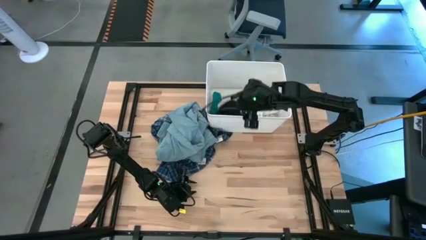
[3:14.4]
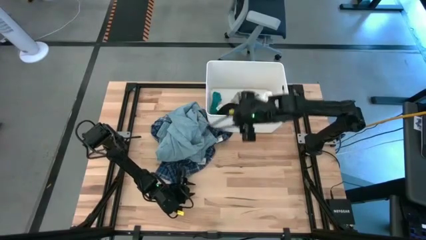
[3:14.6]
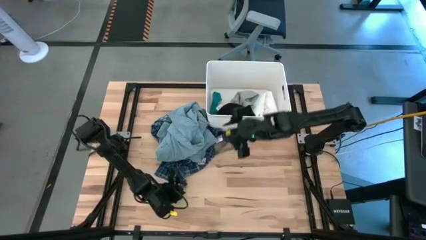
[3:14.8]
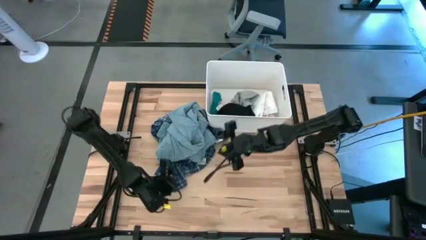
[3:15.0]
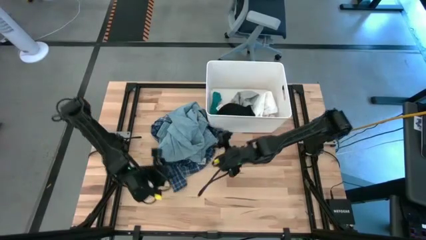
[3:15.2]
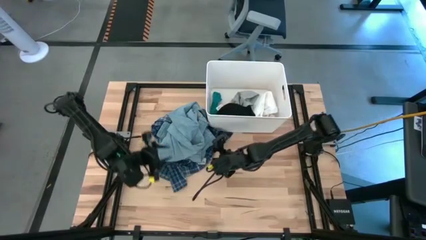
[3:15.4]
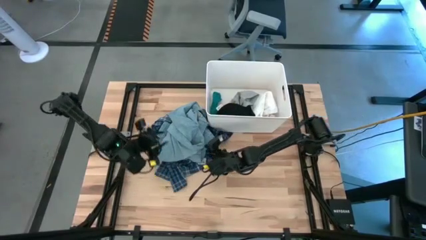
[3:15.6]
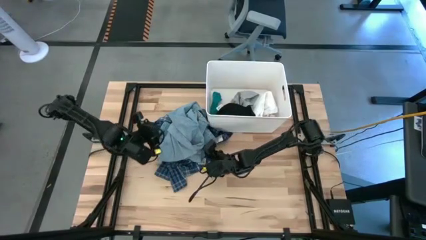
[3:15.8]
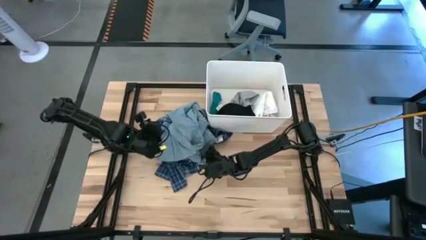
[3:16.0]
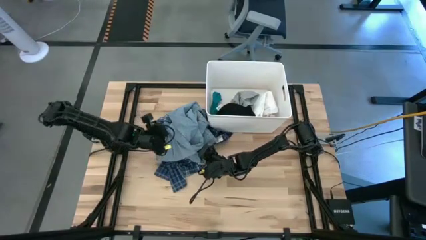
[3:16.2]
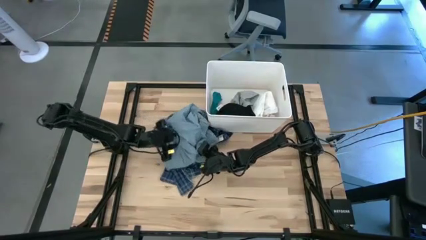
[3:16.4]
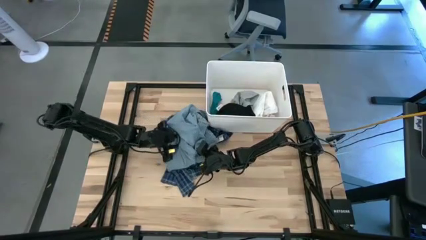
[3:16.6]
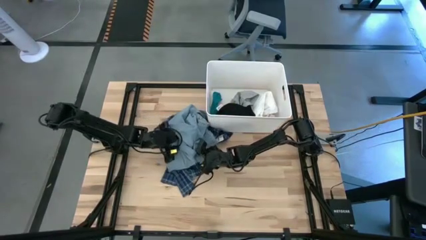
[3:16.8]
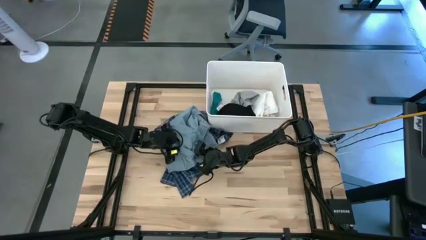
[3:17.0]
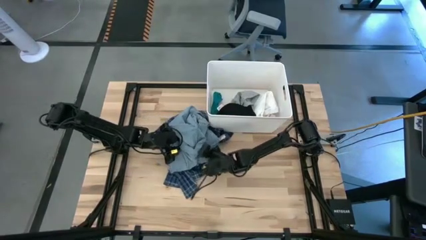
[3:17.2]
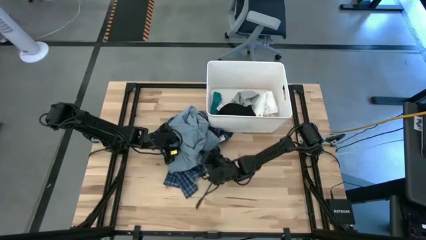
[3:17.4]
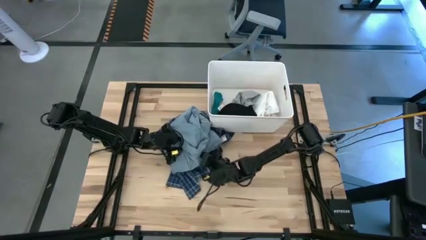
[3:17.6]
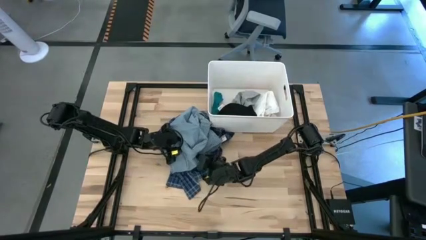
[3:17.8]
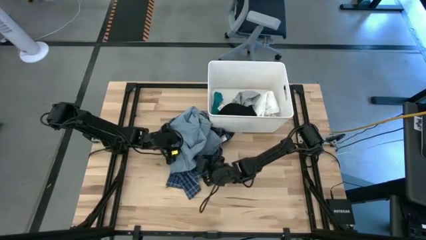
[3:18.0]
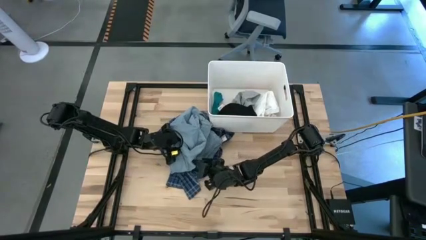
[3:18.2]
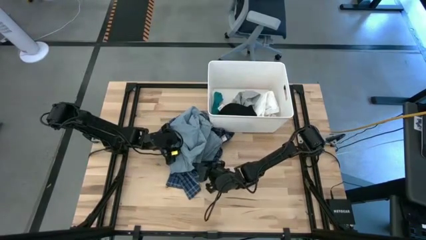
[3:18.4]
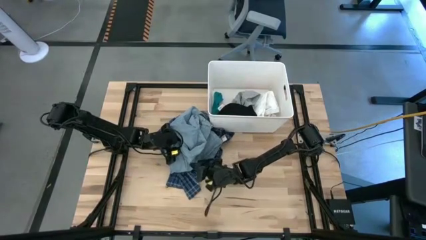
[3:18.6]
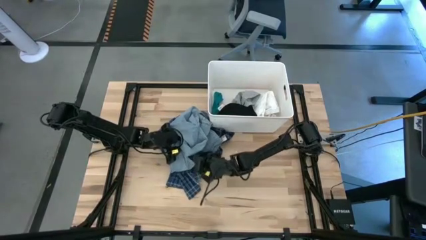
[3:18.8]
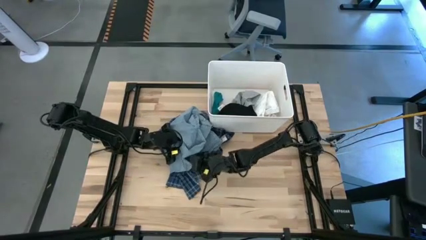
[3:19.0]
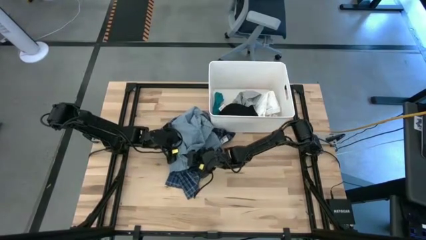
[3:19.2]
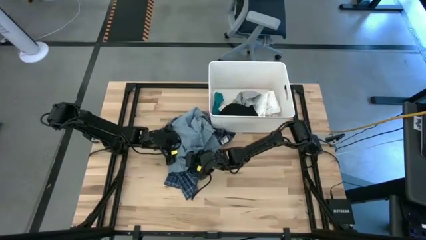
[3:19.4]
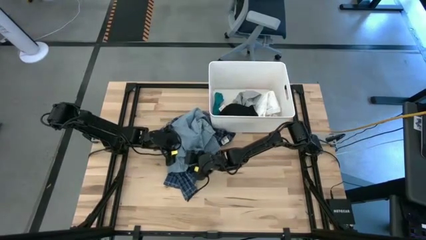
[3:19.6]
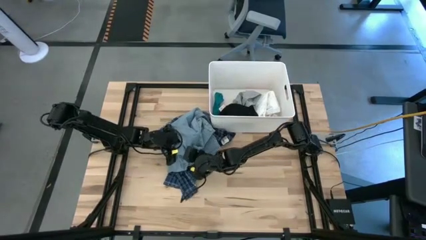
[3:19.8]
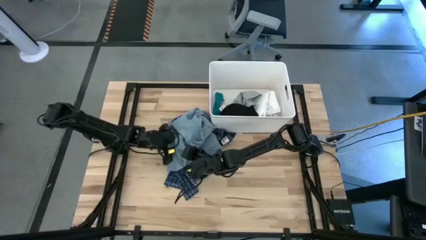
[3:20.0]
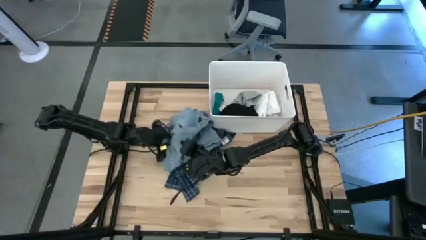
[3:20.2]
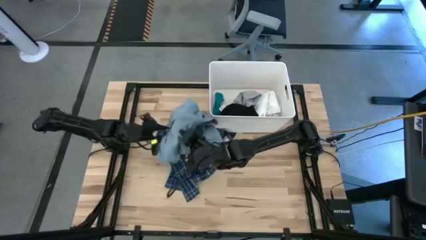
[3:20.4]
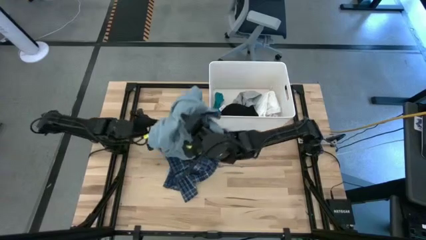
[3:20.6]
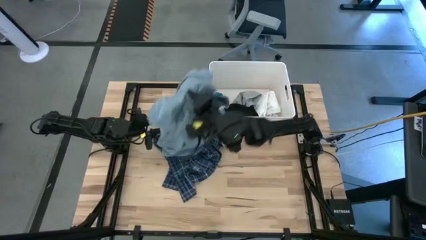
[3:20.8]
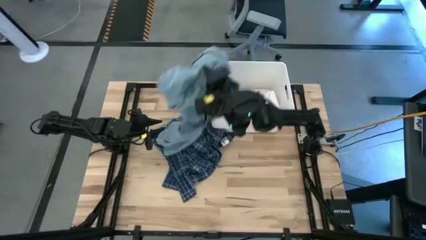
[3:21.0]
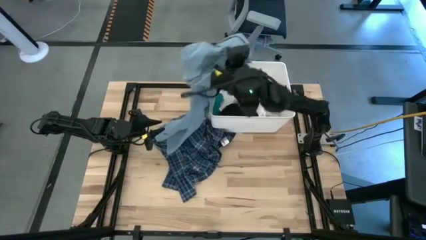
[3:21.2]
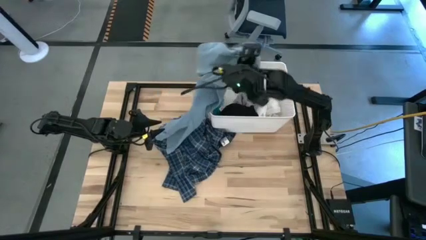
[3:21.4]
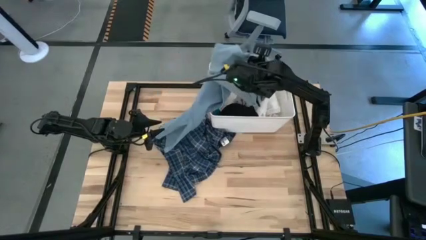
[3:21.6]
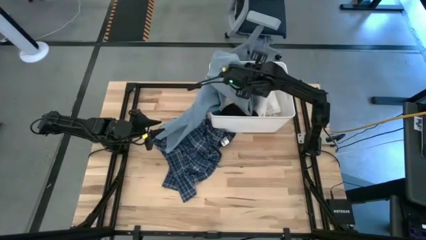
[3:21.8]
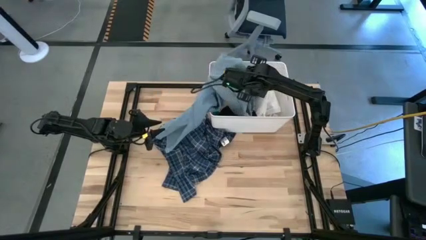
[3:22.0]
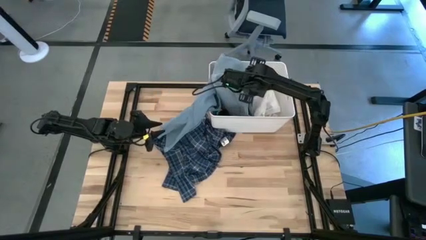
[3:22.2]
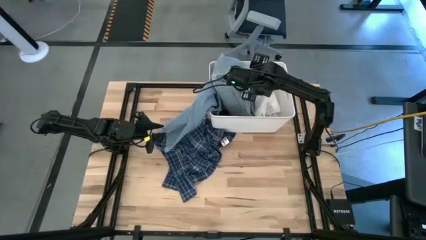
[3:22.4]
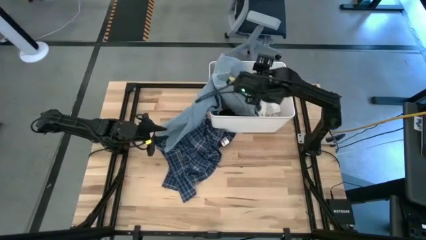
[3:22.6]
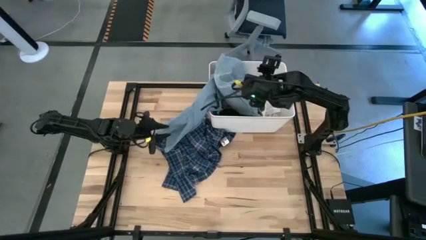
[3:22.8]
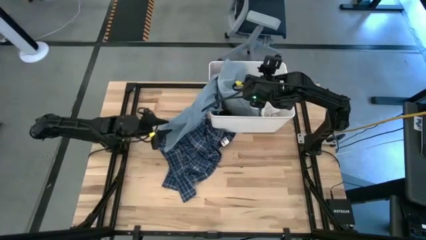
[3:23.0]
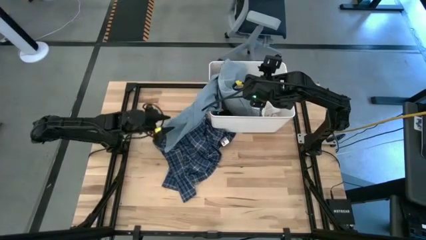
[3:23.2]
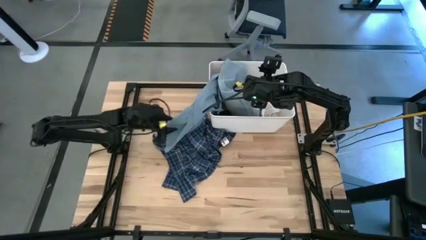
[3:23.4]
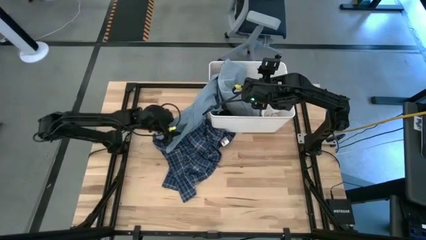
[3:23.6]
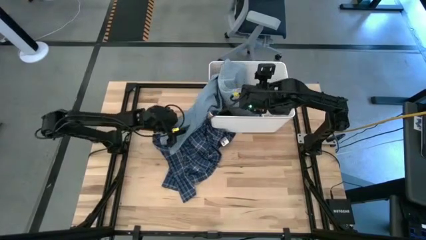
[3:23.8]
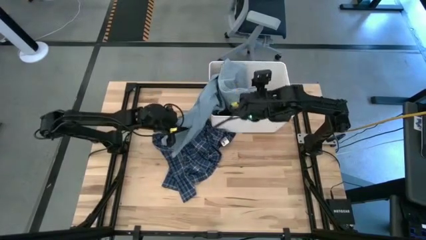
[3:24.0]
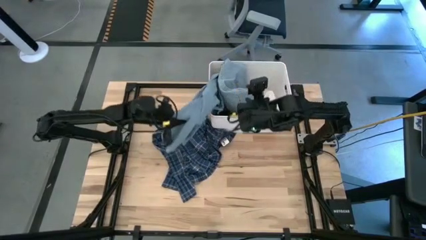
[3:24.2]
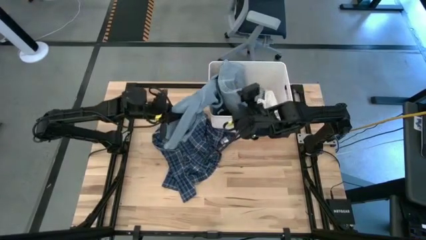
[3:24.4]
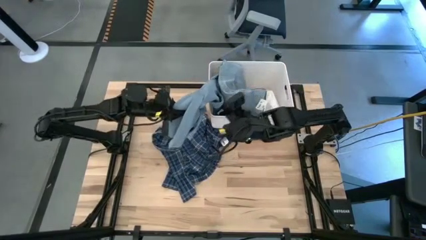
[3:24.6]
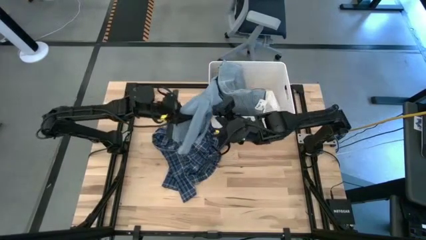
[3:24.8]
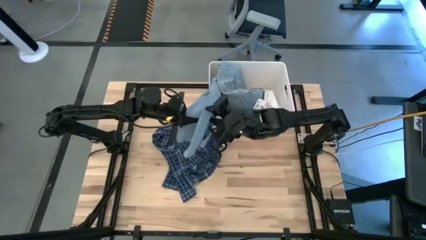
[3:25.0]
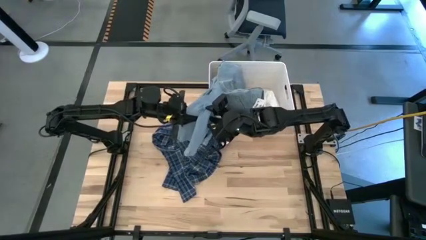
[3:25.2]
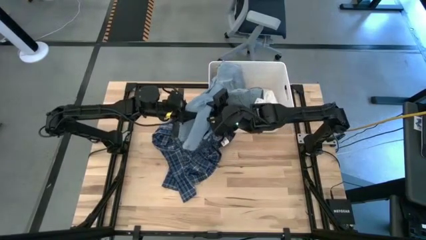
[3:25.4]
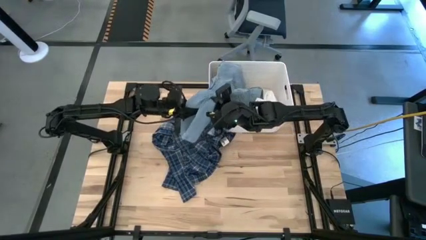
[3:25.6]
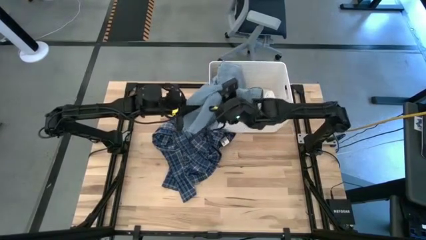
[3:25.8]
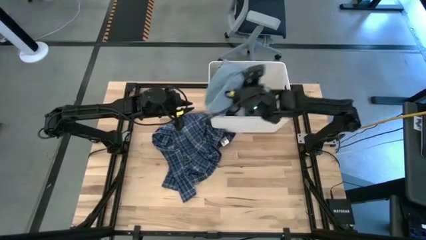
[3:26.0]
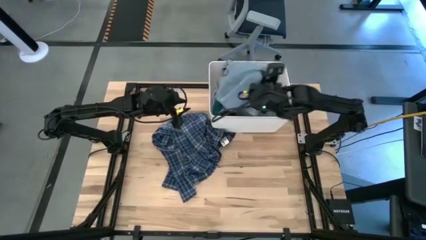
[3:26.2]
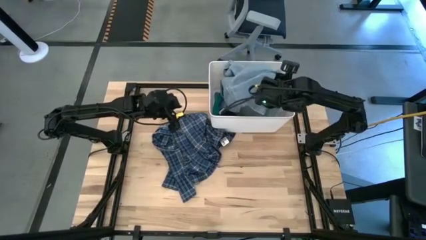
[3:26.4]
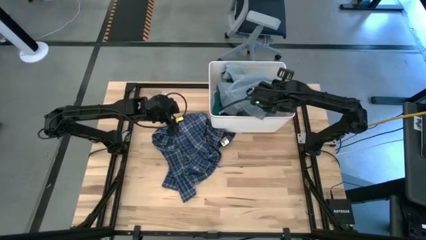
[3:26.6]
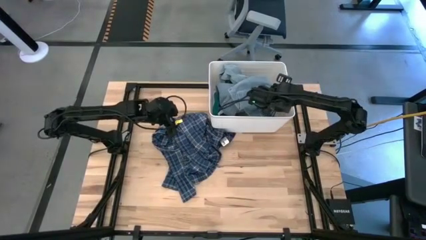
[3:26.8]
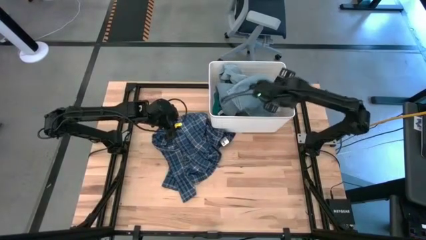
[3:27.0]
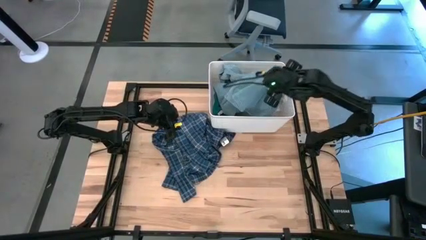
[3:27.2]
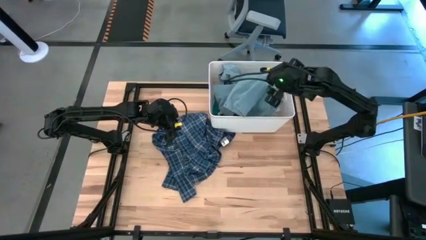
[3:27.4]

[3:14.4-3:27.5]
Task: Sort clothes
Put the blue denim pants into the white laundry bin

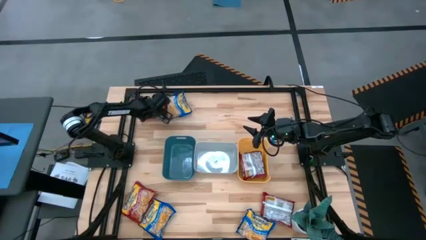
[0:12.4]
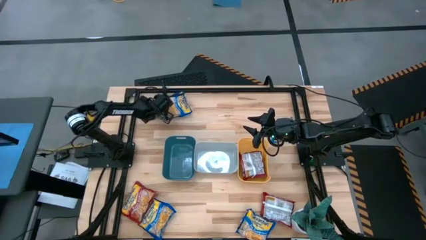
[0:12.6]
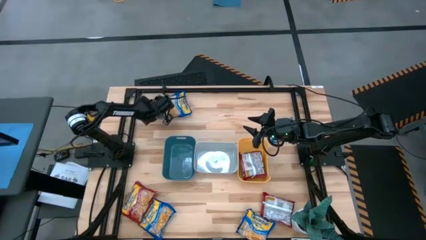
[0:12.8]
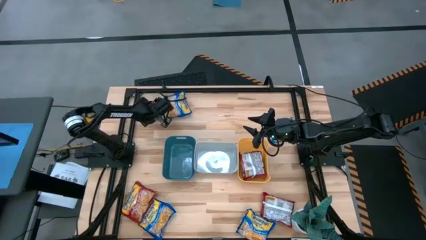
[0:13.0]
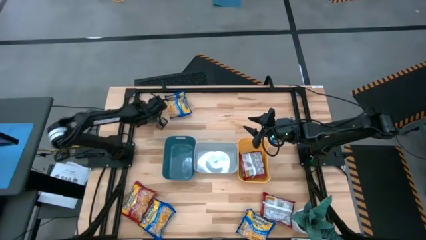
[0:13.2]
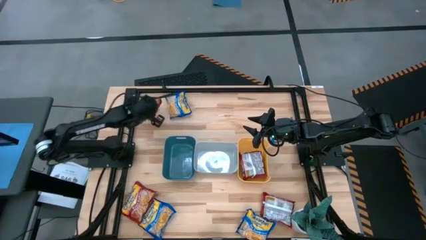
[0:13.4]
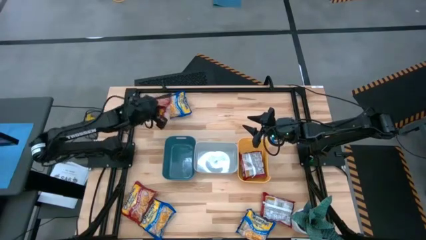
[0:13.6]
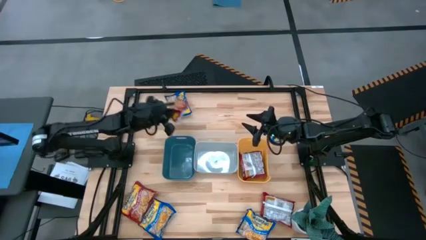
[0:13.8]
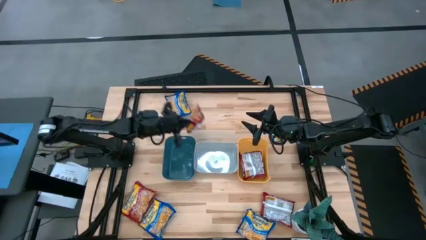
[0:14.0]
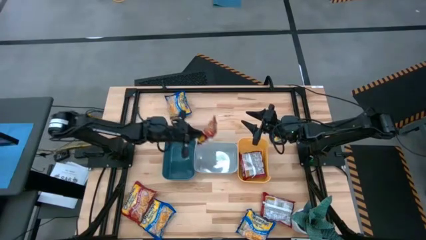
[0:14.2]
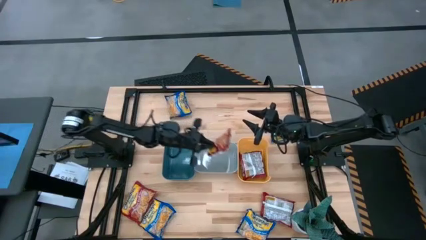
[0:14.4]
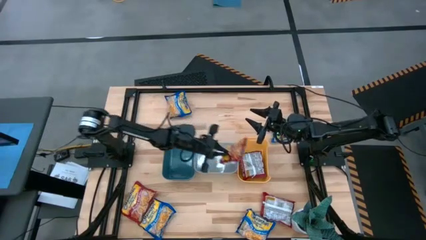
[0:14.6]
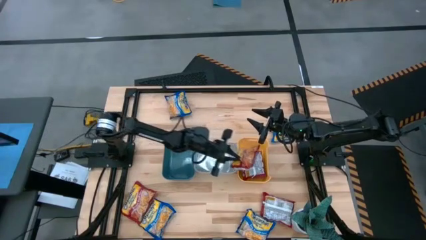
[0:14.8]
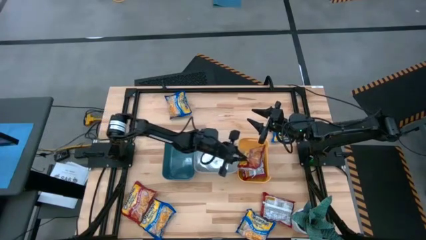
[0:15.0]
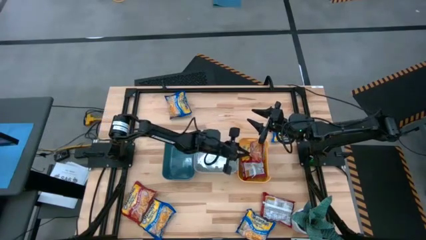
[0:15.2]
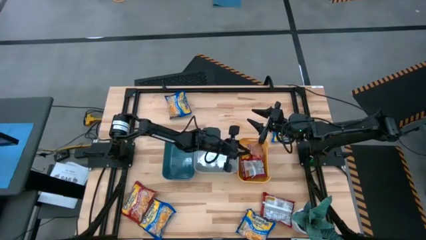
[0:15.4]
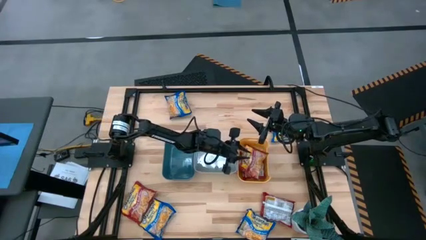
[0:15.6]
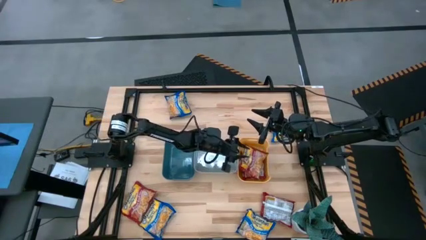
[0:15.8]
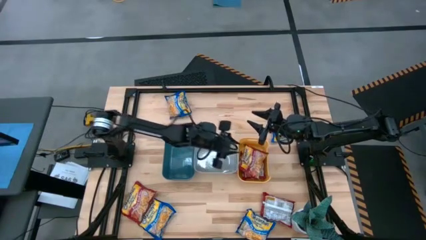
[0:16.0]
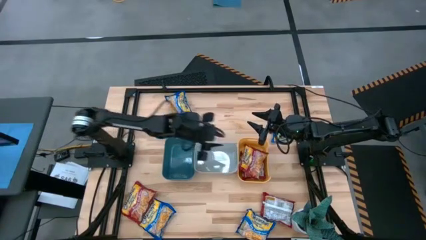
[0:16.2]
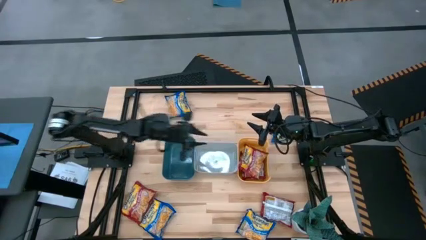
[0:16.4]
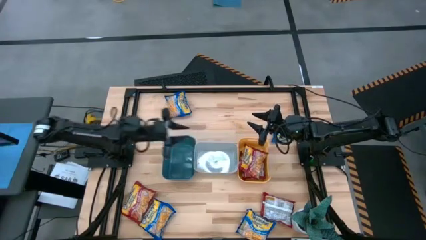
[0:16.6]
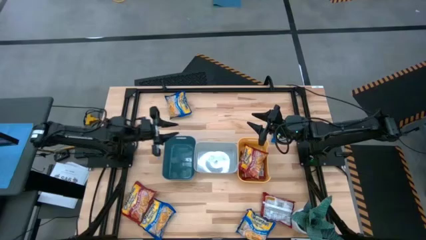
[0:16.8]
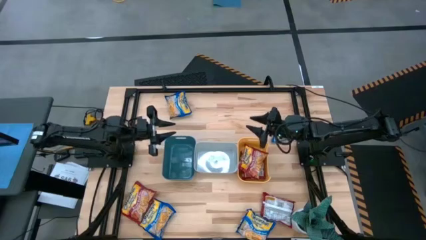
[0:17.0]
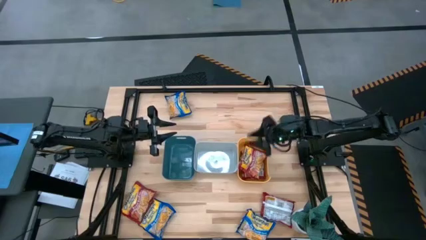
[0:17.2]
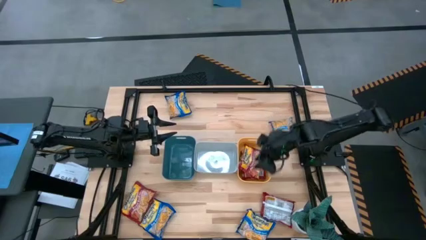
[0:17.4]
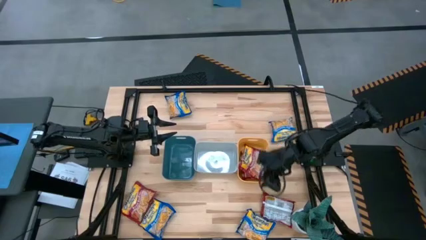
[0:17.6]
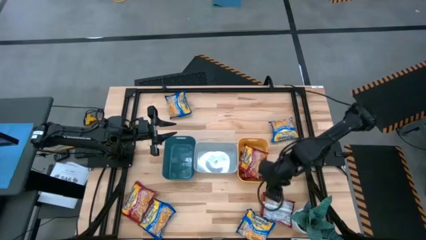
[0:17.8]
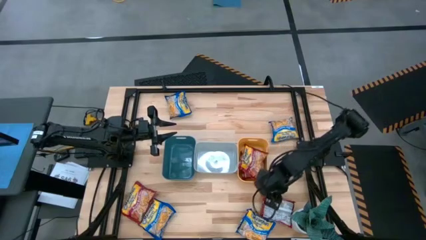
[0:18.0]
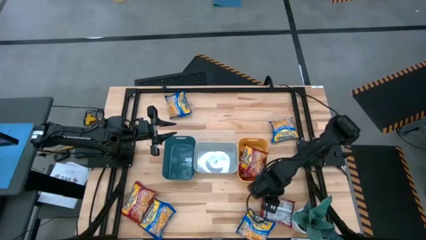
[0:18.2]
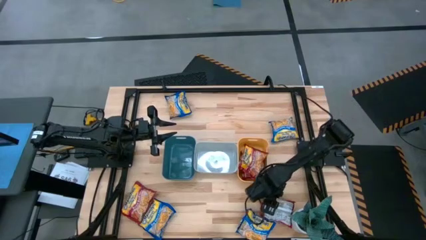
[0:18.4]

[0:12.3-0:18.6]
Task: Sort Maruchan noodles
Put the top red noodle pack into the yellow bin
